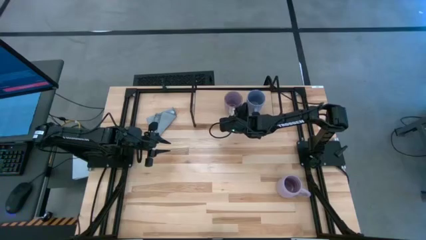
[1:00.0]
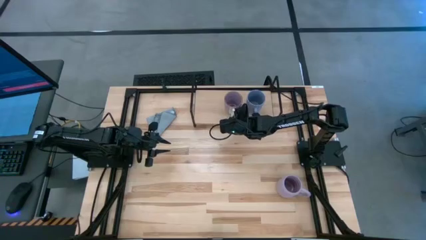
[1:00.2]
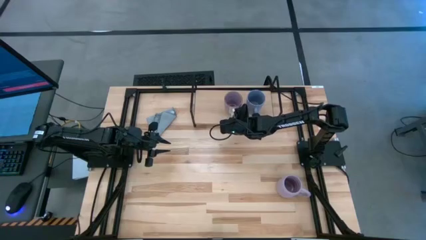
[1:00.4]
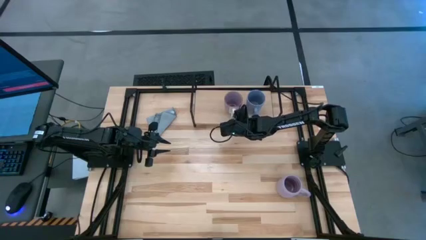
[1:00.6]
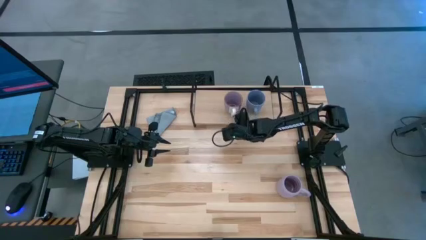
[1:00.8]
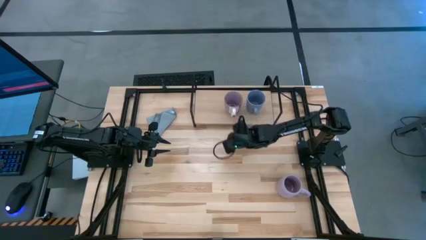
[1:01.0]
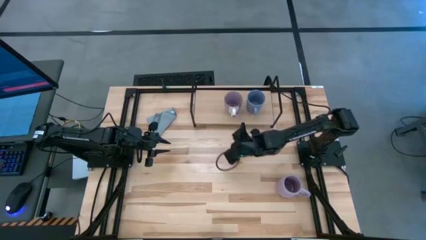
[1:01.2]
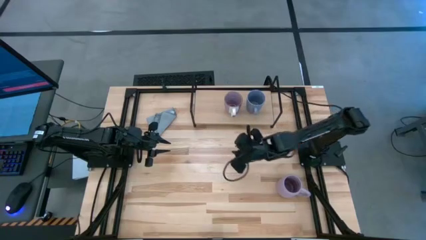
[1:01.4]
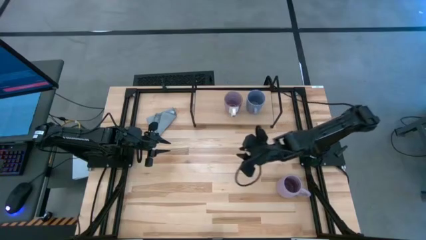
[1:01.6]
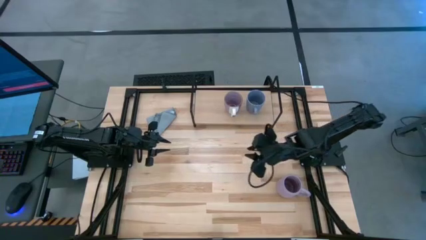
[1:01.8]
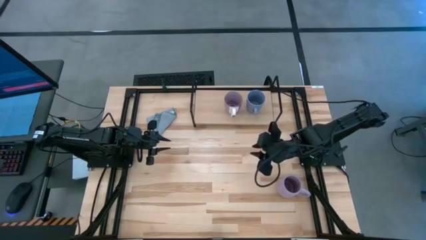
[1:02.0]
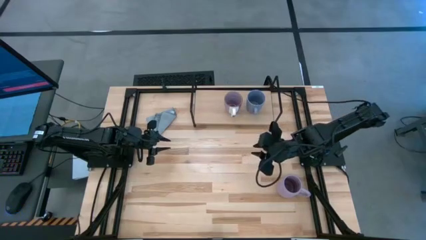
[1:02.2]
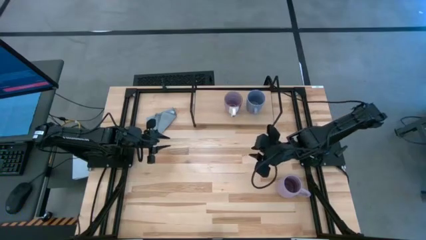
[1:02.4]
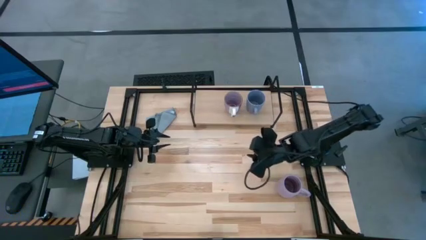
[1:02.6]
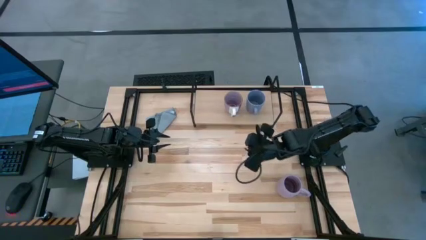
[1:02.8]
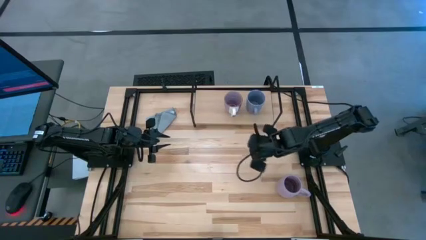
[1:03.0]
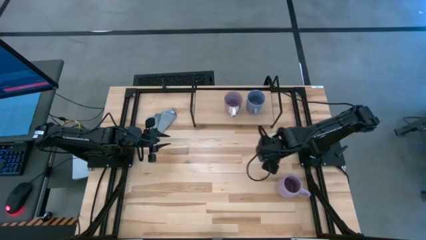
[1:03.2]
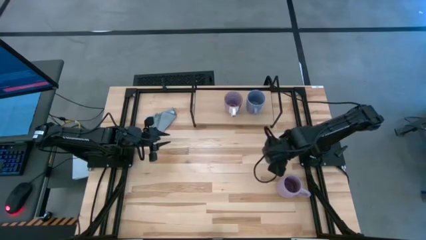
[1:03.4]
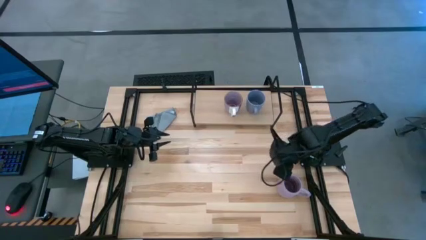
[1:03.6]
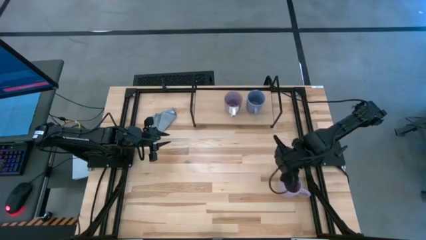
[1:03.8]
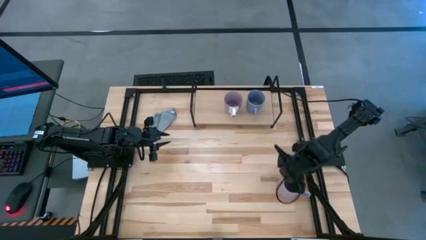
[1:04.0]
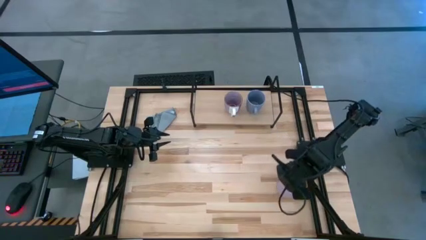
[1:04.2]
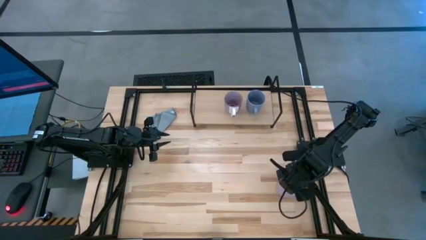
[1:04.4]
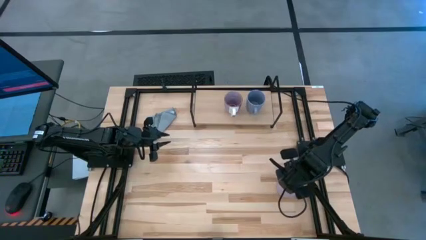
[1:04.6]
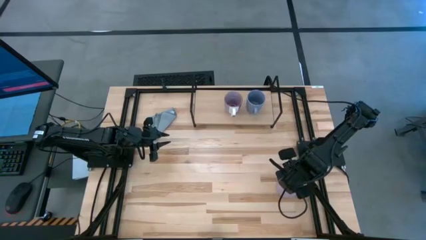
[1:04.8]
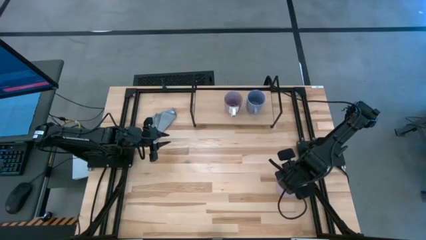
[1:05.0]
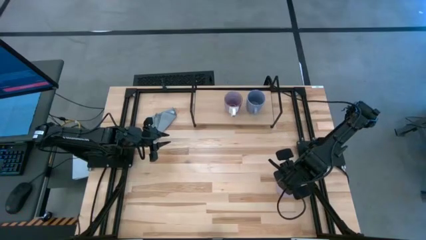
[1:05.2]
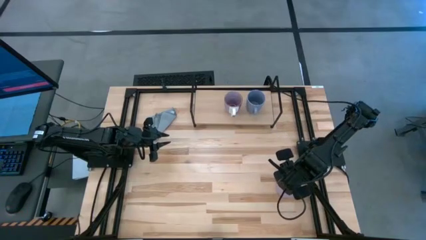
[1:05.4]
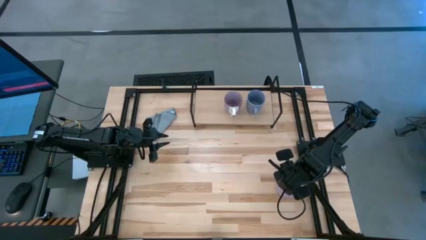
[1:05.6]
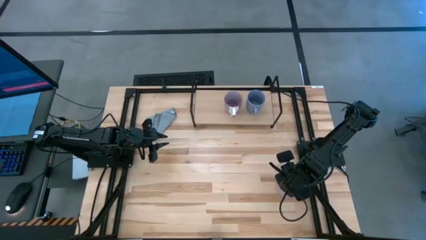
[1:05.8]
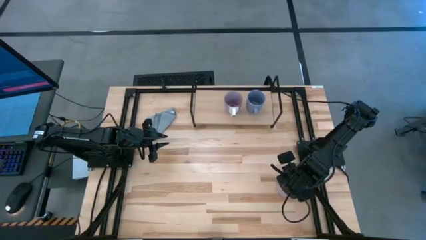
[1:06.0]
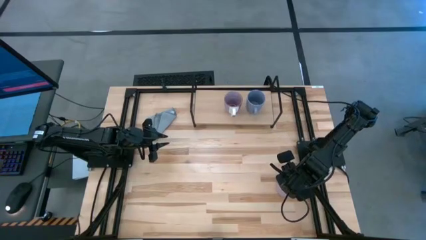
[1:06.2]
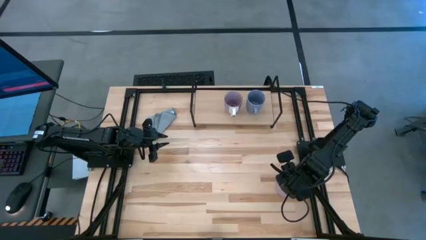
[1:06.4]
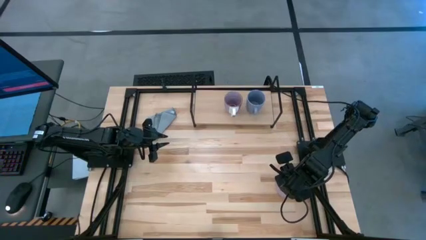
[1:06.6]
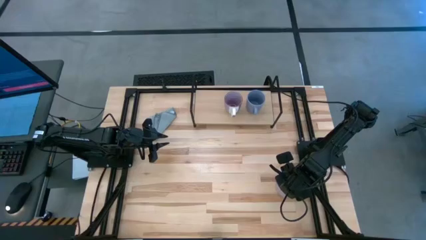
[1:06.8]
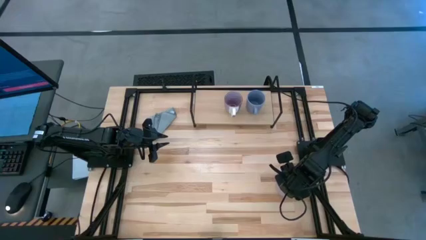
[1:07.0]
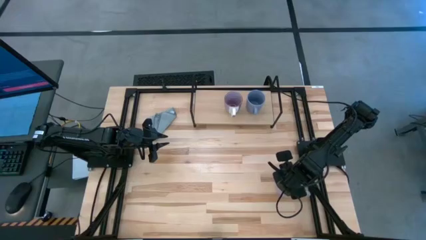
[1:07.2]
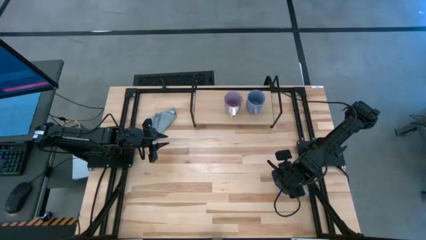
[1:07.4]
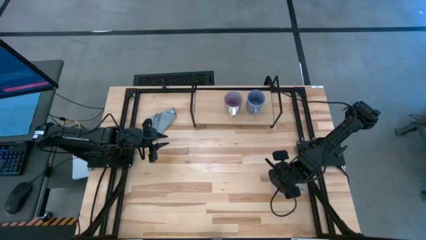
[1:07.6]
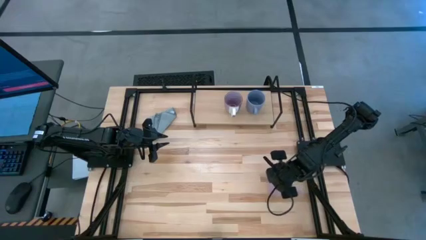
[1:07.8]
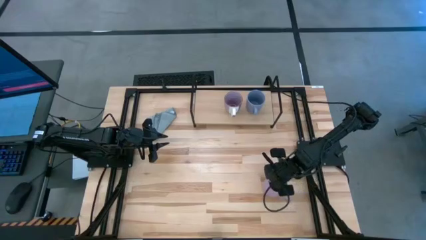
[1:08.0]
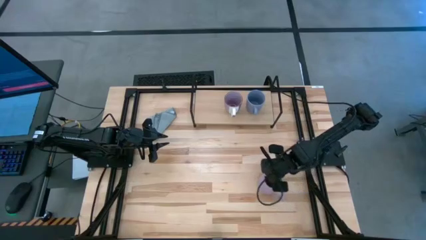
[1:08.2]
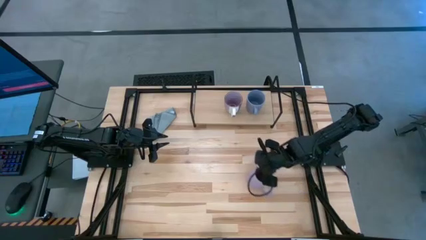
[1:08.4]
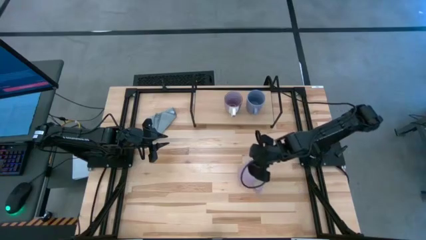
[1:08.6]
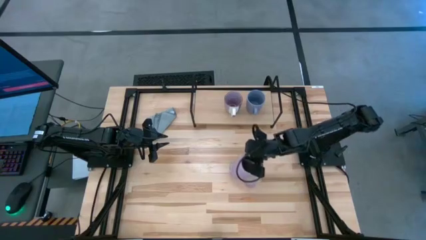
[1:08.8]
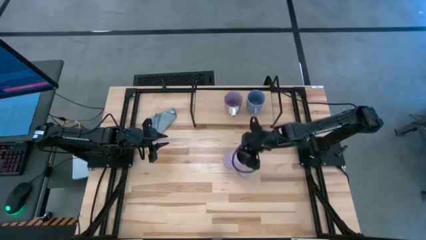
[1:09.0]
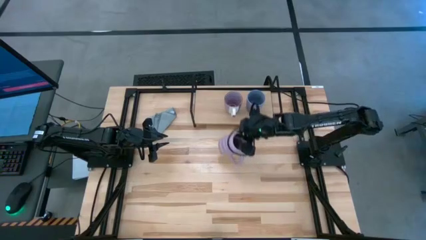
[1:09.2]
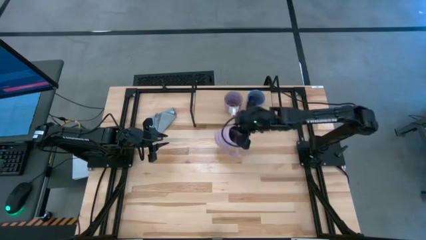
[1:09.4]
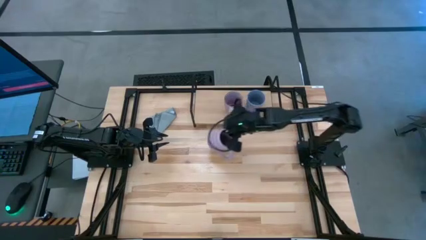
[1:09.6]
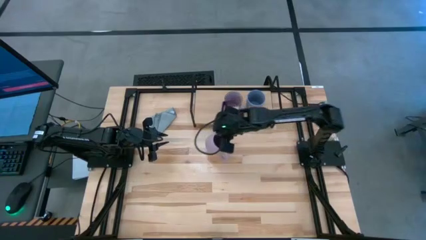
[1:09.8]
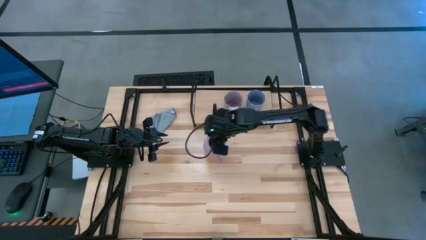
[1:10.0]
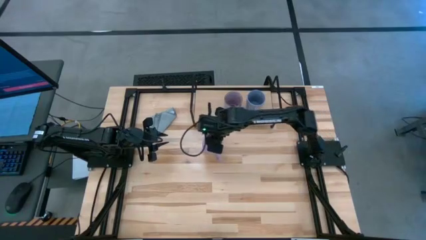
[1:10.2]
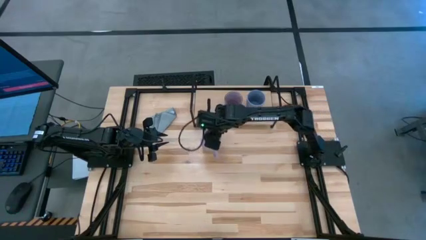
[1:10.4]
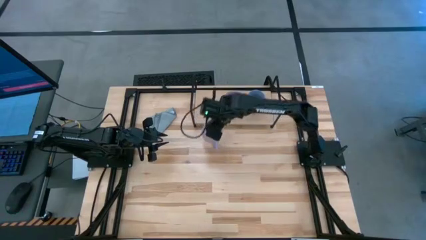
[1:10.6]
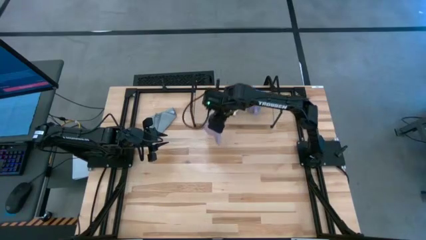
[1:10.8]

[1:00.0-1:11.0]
Task: Stack small to large cups/mugs on shelf
Put the purple cup on the shelf

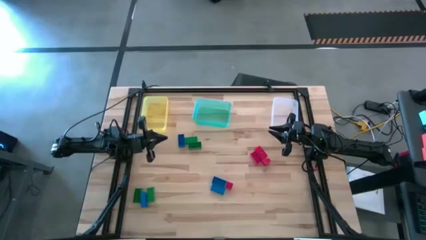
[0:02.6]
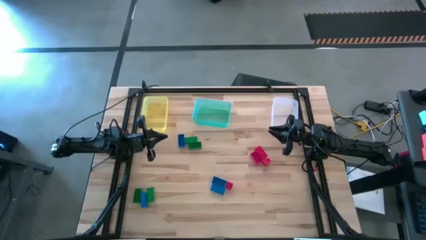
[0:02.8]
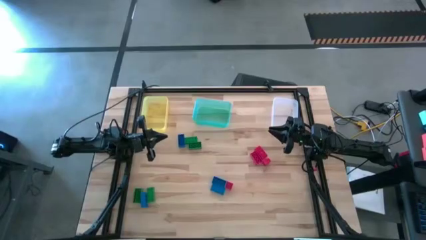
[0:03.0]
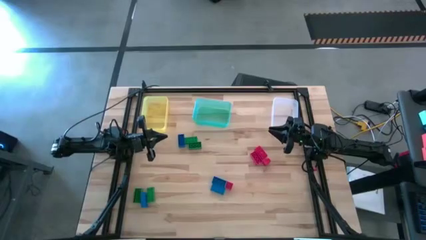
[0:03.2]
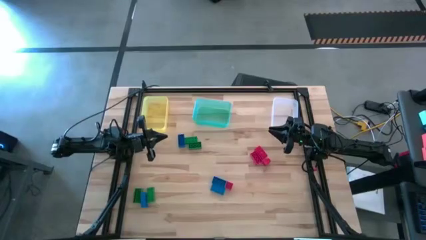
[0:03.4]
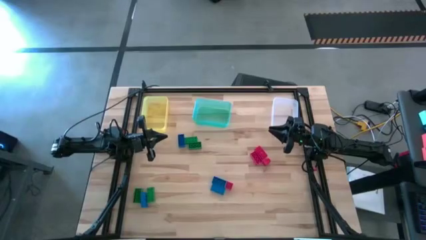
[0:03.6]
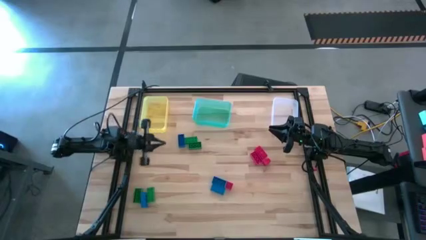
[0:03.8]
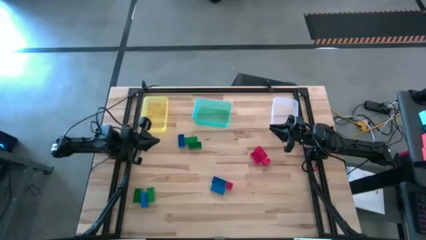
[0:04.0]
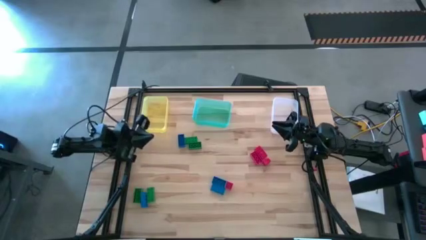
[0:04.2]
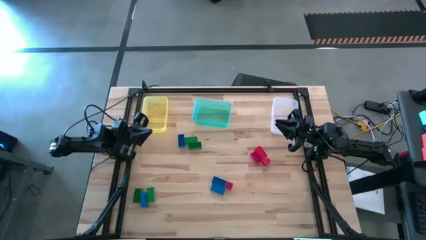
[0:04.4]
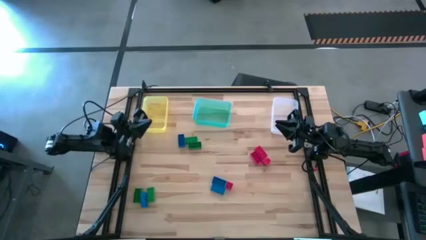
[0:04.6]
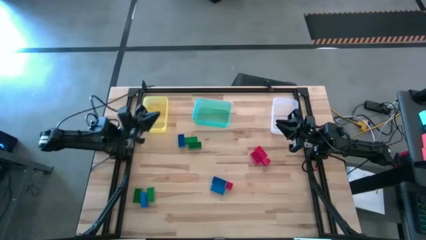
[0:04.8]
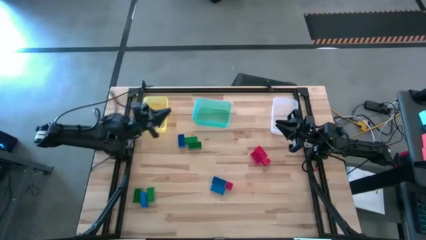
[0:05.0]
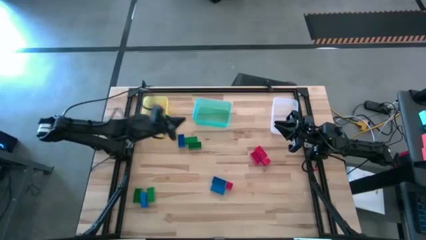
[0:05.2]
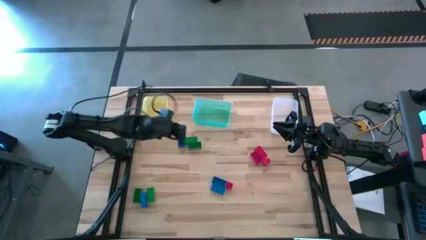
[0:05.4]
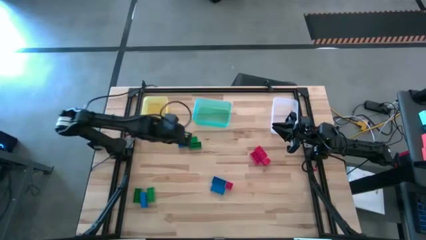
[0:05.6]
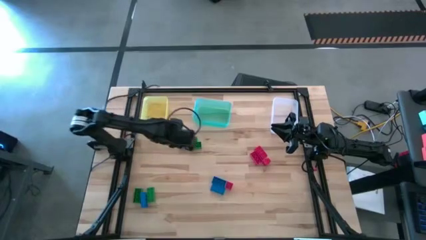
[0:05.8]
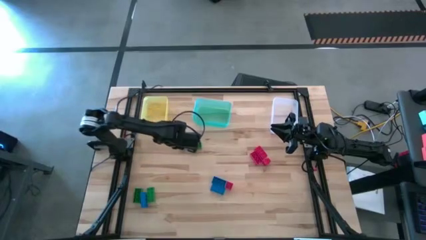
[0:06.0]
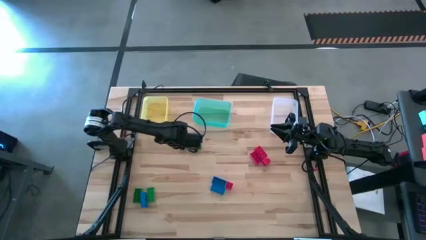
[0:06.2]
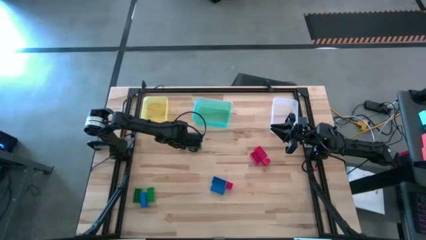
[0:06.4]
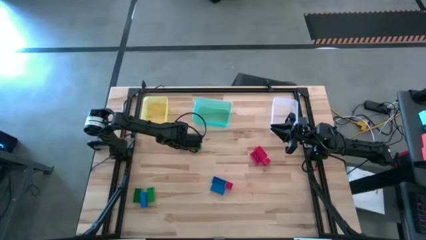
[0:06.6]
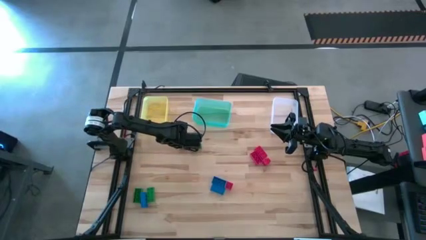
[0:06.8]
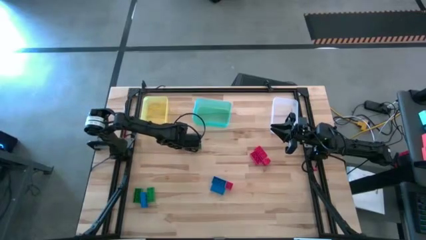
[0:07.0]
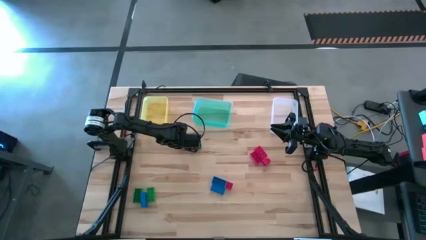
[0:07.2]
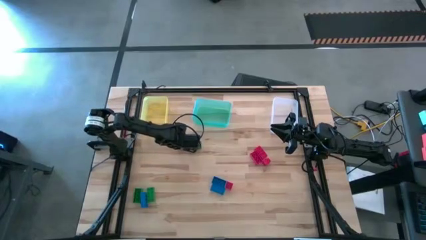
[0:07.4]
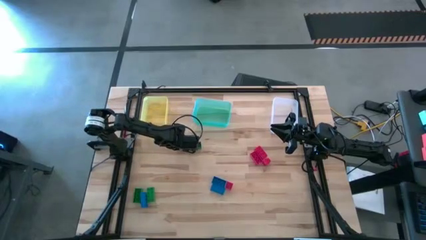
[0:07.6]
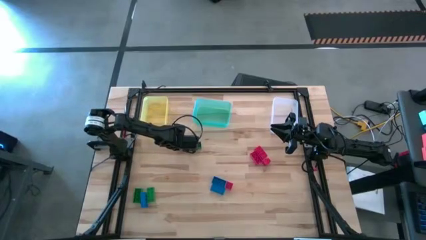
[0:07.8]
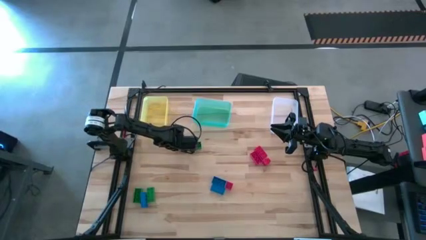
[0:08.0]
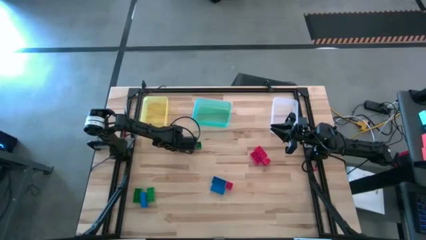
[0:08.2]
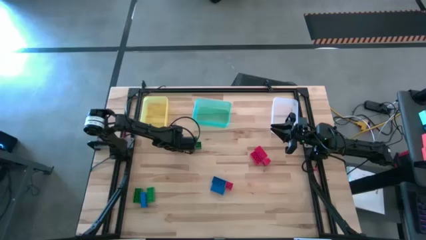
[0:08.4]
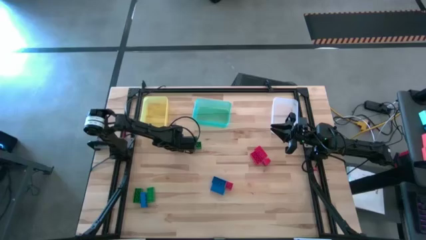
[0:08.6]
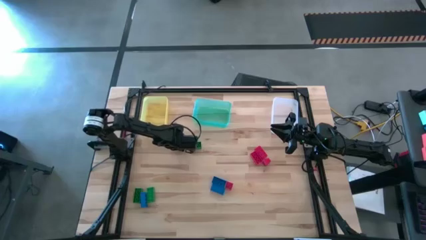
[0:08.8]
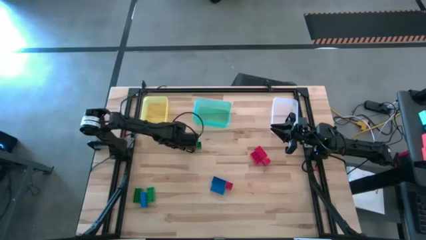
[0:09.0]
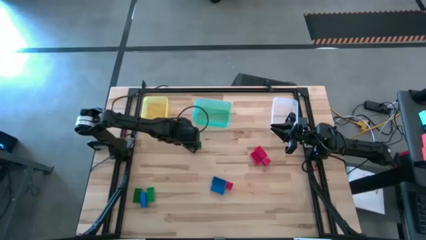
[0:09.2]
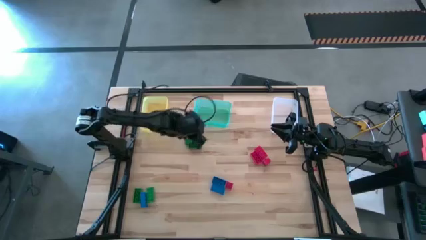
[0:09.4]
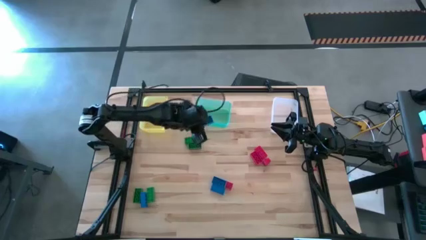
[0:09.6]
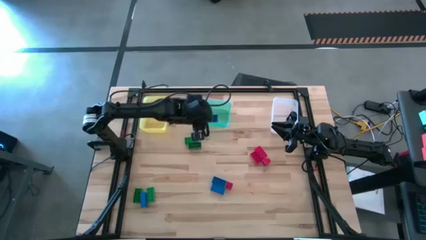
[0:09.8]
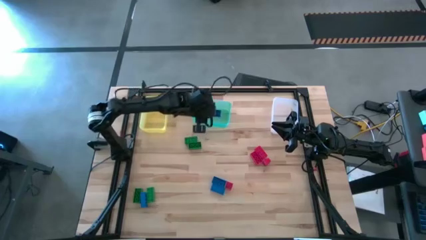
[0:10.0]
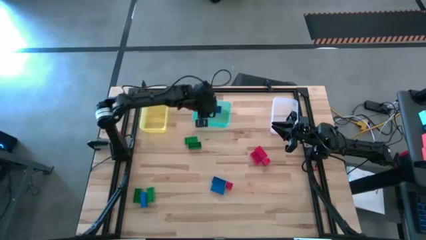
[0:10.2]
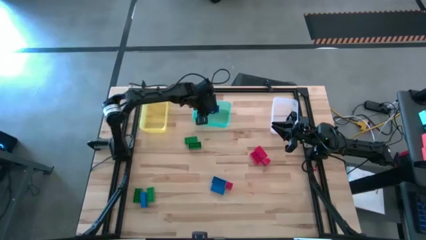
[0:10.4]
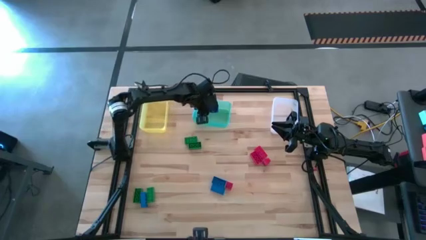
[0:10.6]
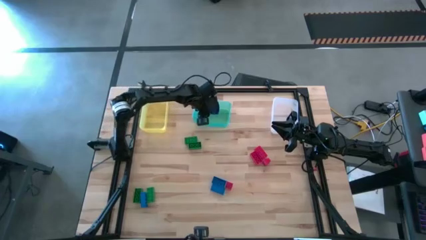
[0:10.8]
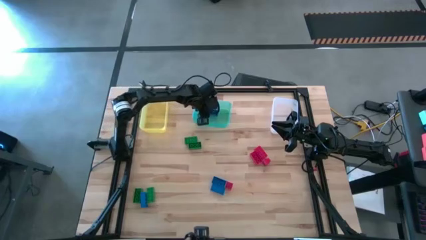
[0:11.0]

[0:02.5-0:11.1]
Task: Sort & place blocks by color
Put the blue game piece into the green bin
